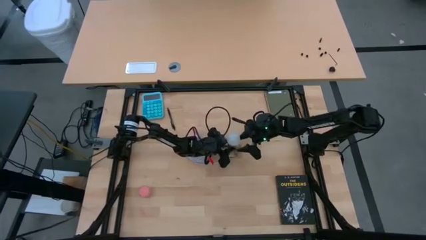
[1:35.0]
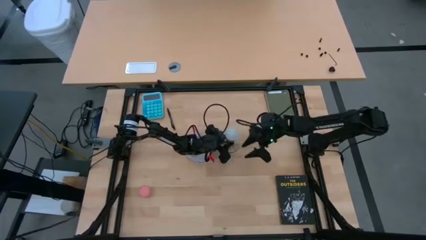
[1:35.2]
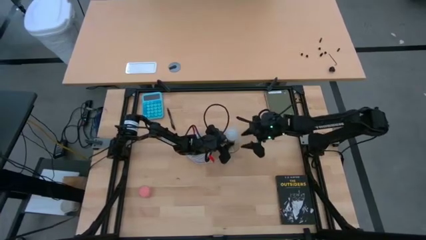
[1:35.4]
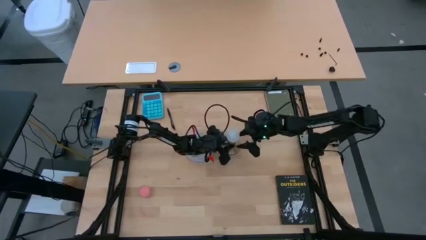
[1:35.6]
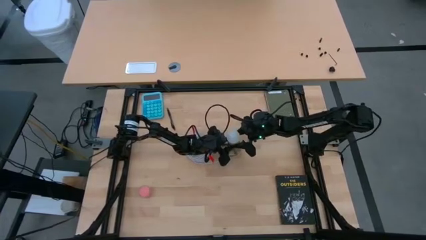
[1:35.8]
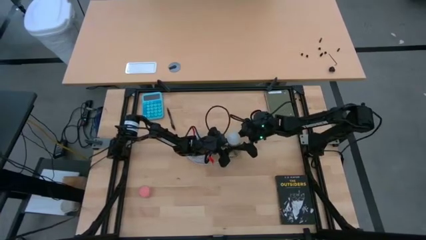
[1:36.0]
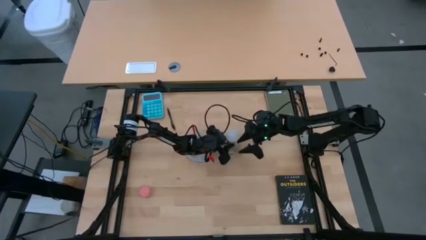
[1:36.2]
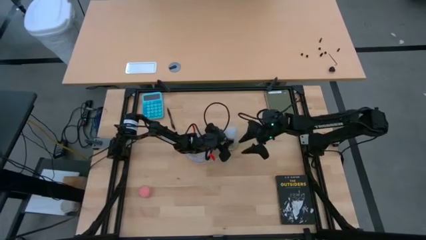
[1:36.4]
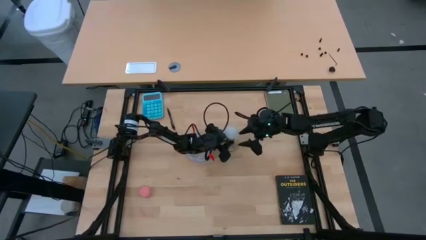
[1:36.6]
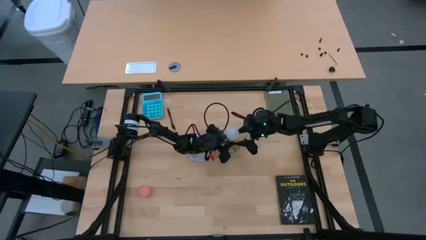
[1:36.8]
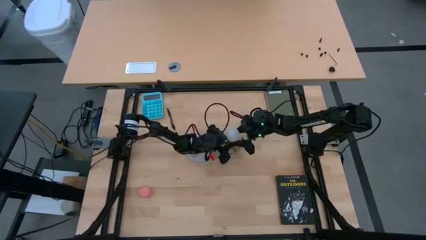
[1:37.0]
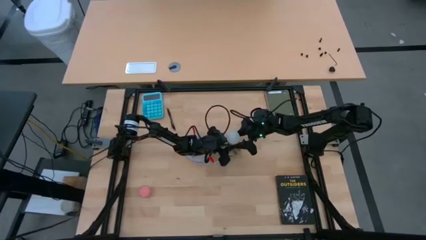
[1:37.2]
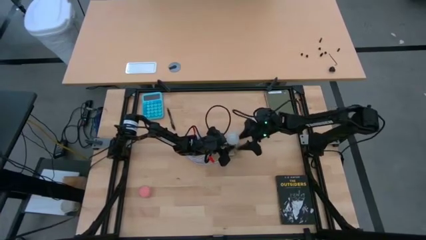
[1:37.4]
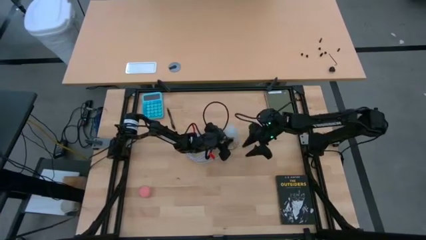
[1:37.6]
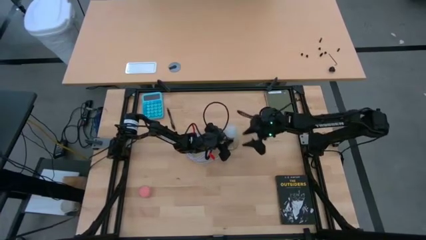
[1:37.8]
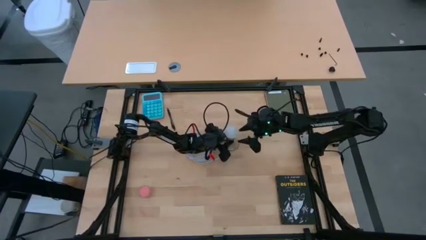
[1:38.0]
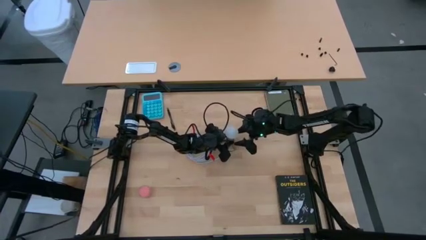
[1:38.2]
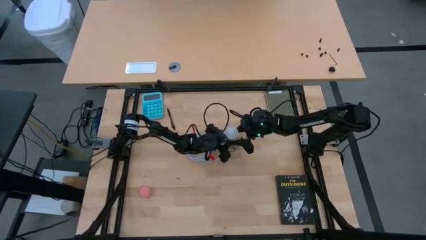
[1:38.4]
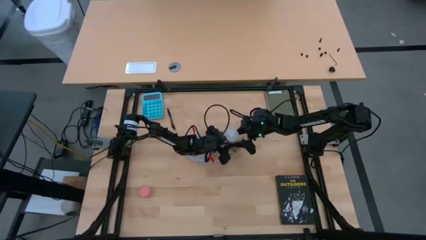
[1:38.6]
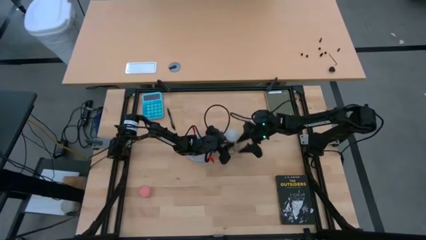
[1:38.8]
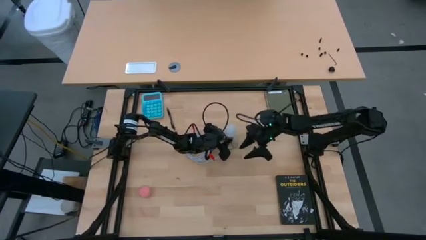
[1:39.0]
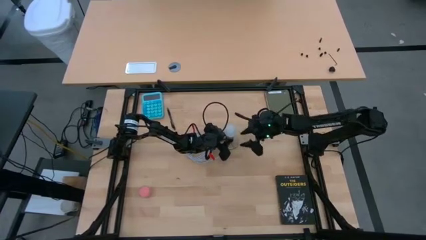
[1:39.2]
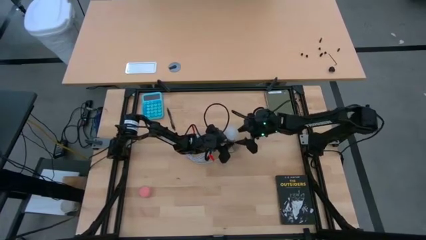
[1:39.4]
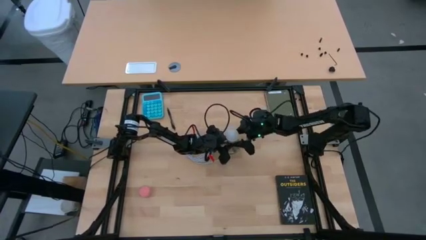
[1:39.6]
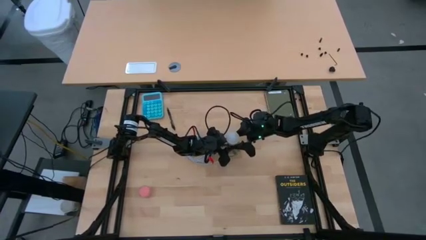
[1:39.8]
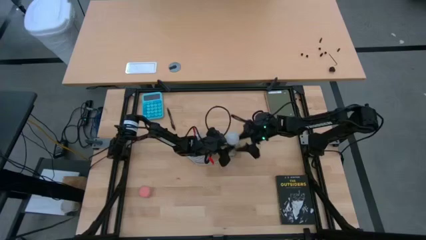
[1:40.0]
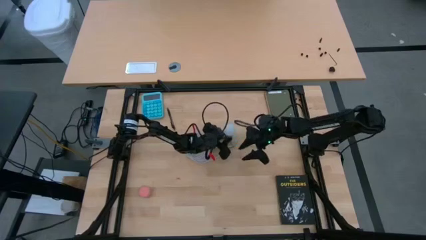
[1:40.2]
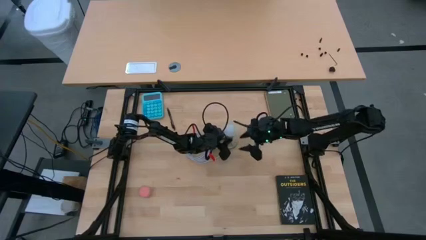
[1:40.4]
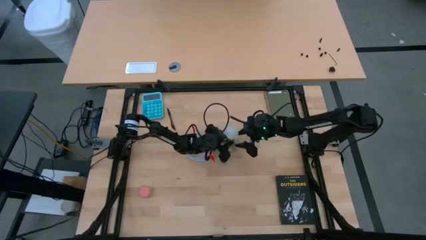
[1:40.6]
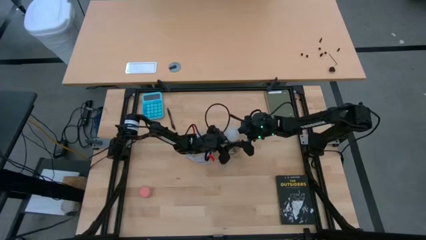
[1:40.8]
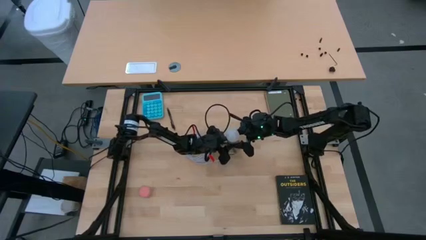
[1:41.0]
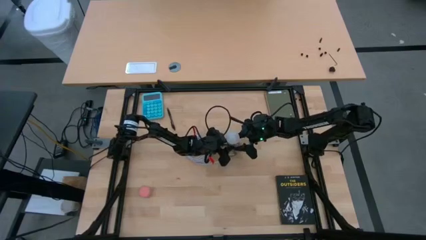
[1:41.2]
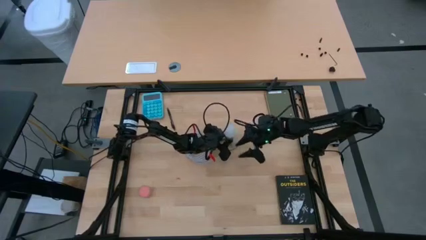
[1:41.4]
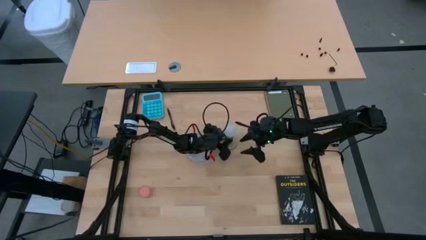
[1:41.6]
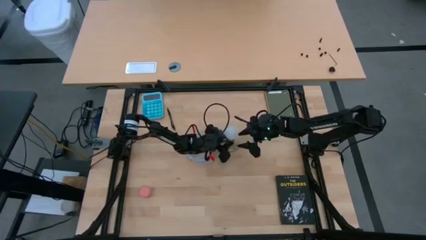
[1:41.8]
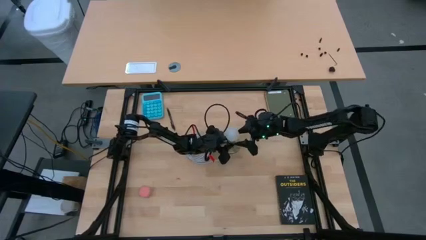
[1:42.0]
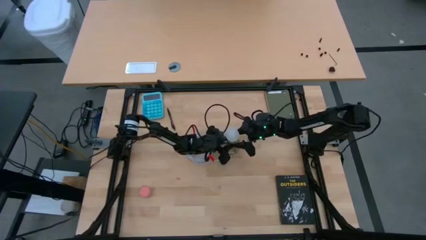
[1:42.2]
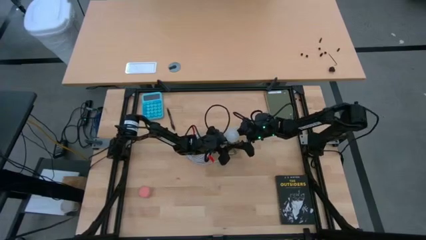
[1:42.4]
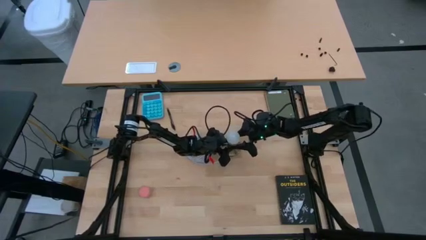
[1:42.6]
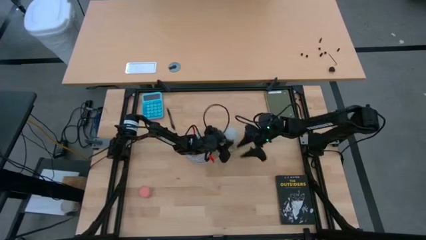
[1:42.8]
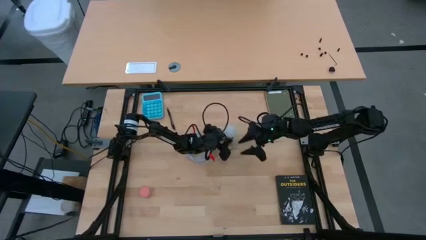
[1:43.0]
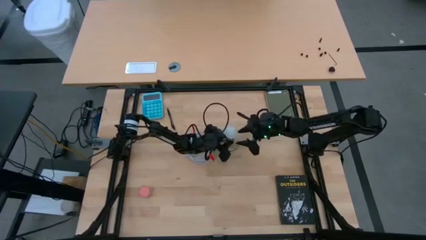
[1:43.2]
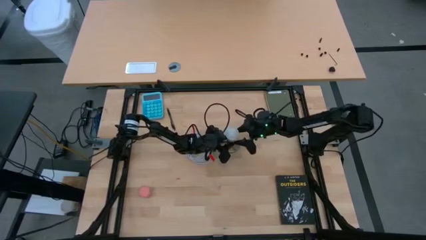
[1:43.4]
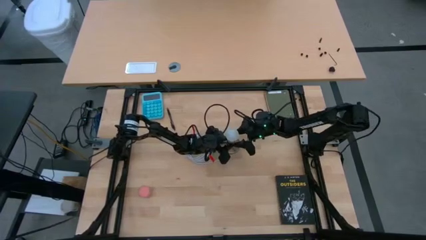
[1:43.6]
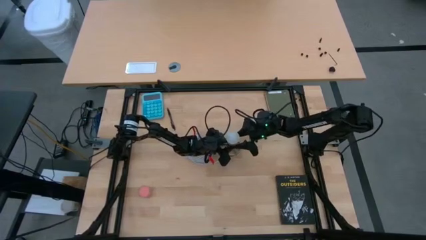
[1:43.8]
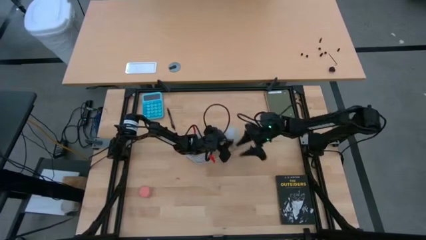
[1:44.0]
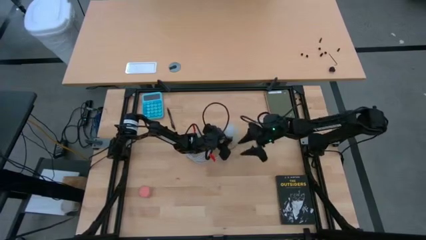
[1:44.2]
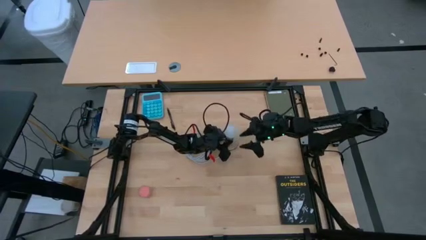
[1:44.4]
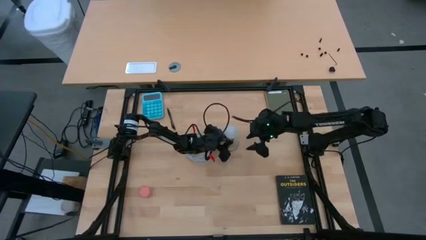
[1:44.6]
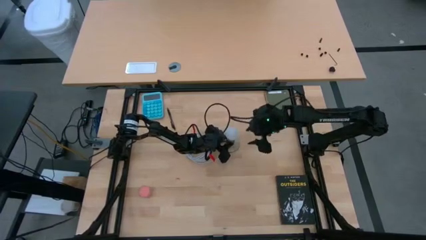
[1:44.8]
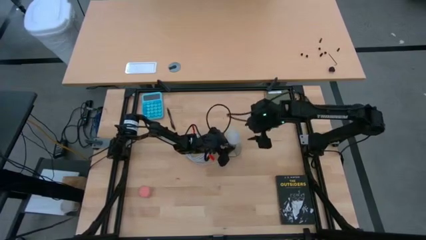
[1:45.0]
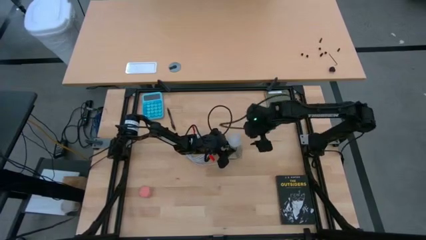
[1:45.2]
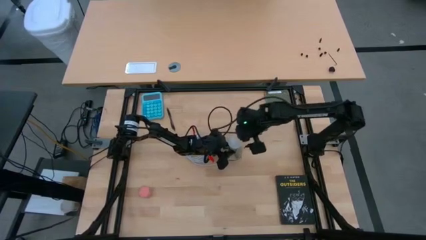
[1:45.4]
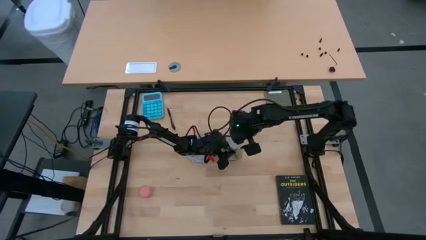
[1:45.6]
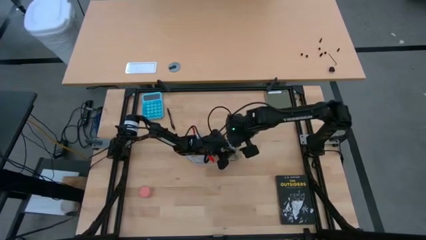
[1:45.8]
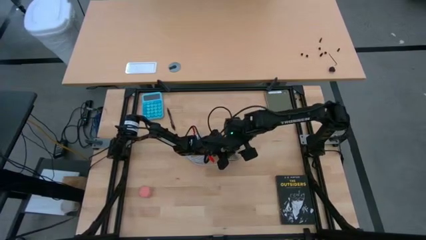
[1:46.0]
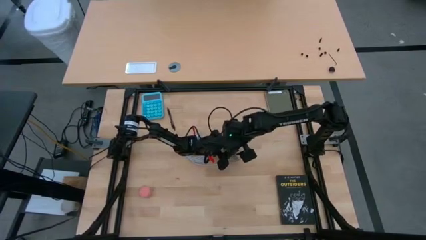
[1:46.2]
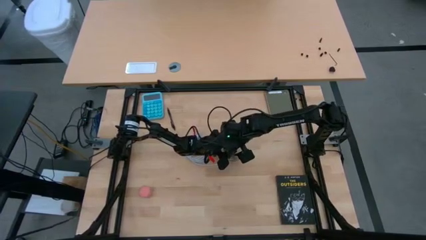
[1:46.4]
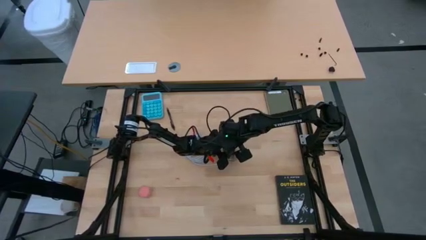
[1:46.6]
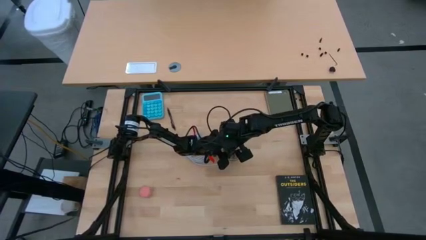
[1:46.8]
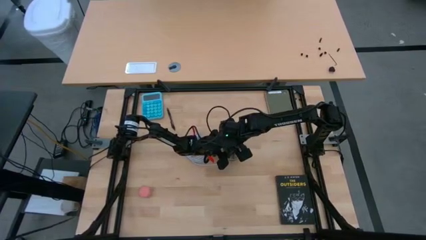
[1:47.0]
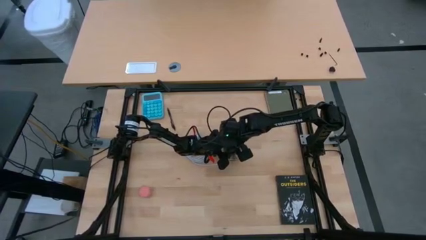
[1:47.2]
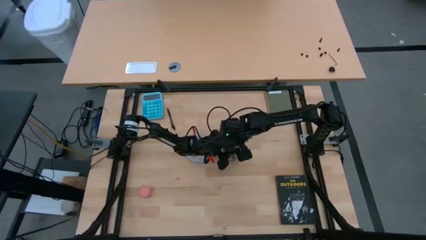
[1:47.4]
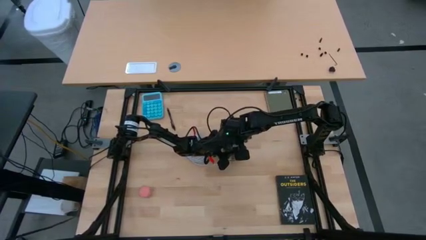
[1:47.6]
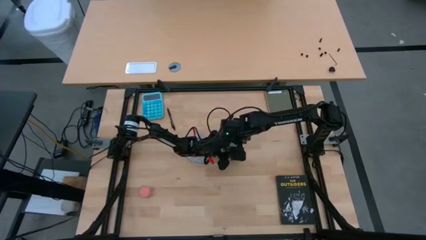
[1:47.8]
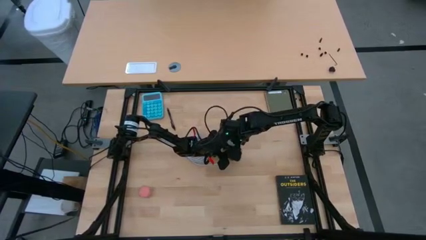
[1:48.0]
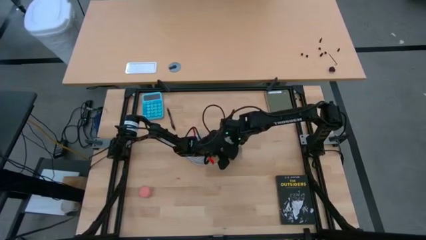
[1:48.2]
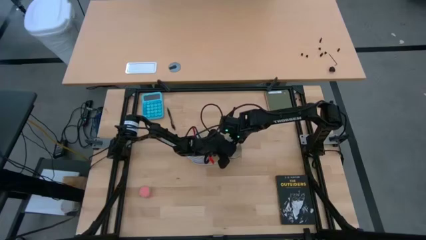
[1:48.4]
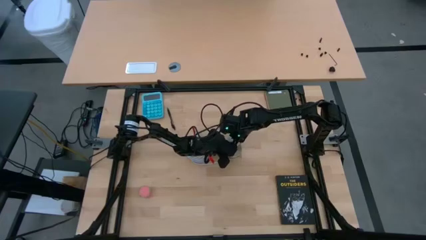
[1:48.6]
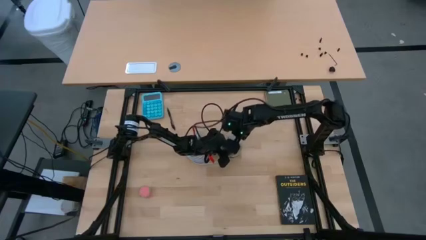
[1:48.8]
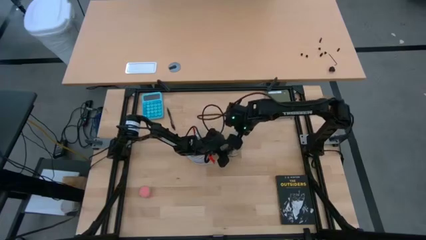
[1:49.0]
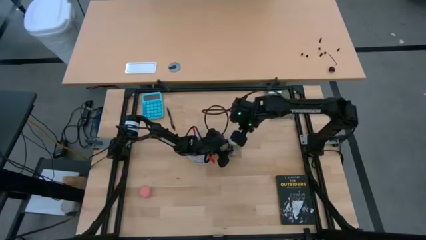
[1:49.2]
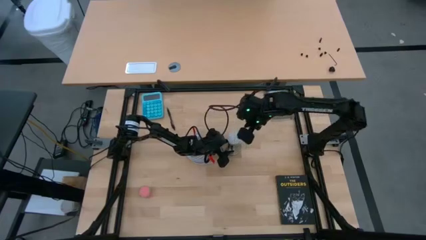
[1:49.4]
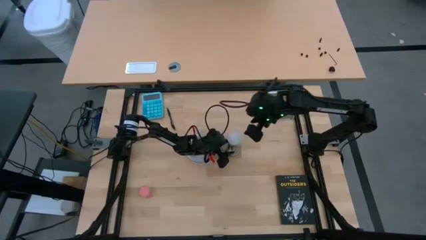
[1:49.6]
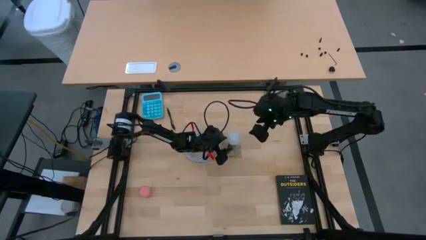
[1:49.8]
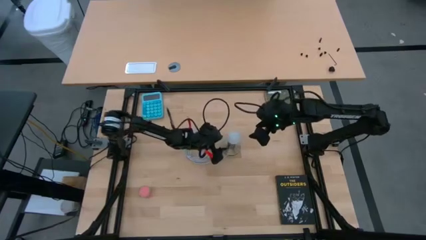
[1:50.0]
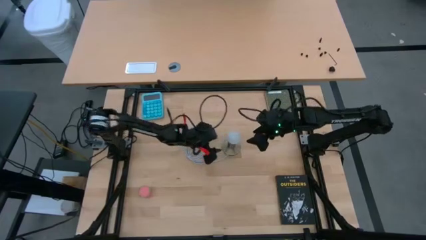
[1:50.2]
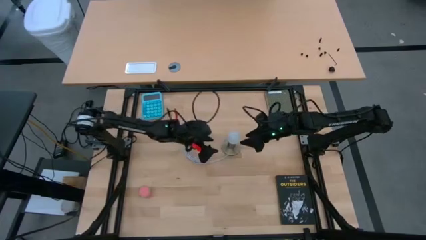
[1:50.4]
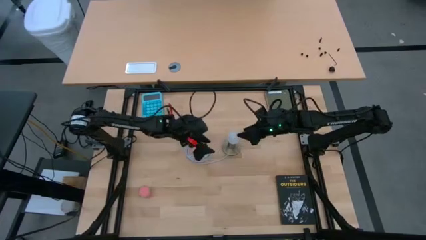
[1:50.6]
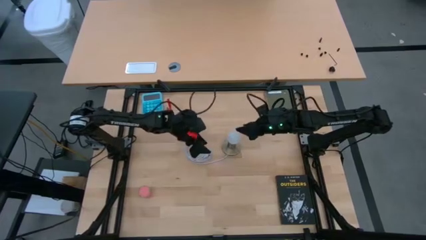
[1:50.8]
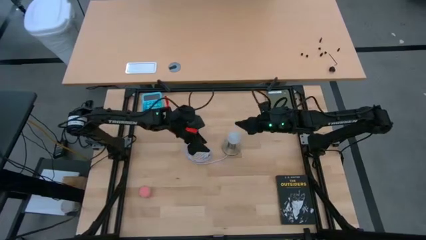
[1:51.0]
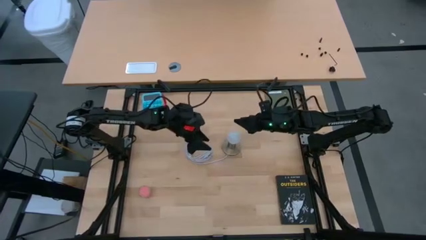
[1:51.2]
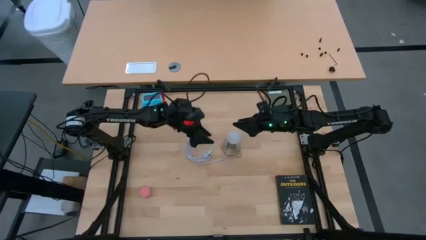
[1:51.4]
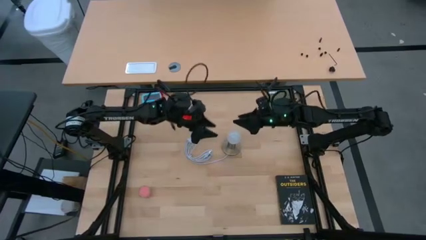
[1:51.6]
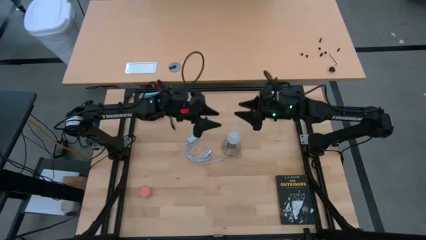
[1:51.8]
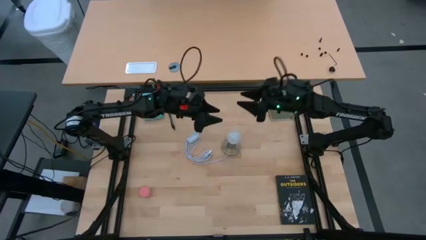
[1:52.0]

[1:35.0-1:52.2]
Task: Screw lightbulb
Insert the white lightbulb into the desk lamp
